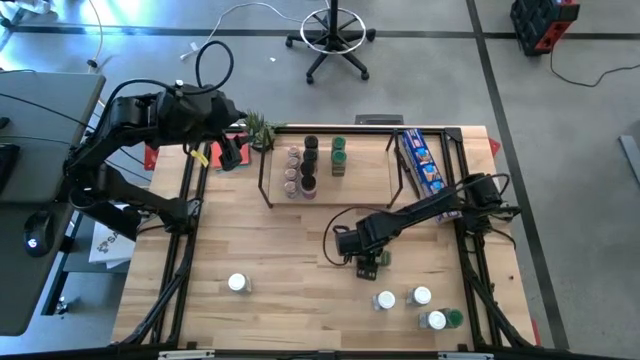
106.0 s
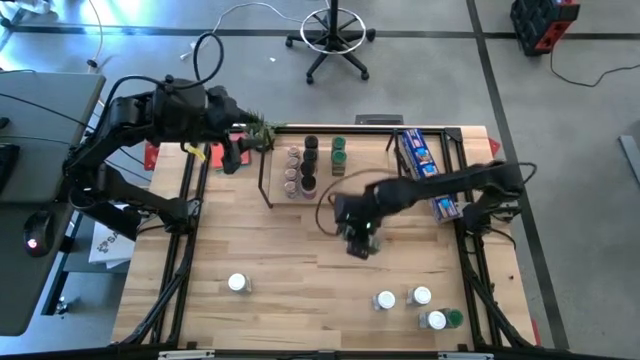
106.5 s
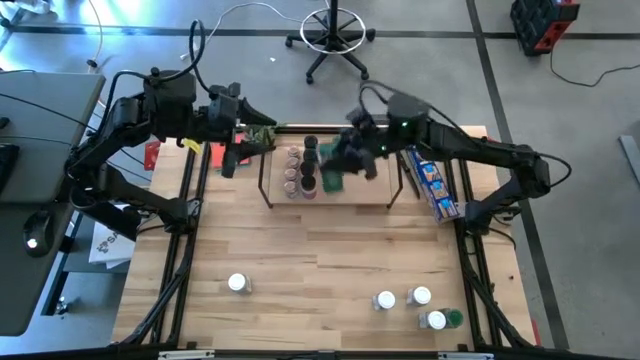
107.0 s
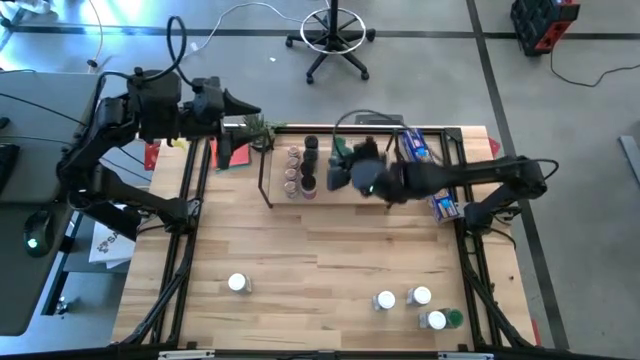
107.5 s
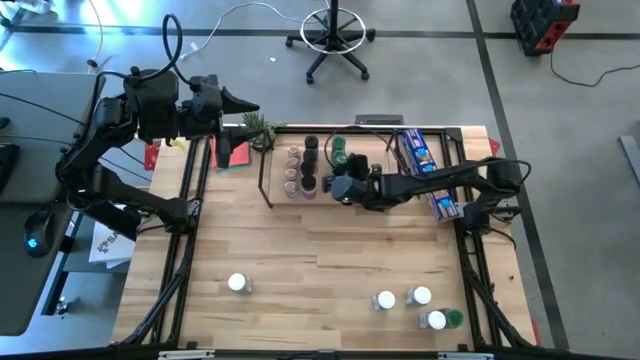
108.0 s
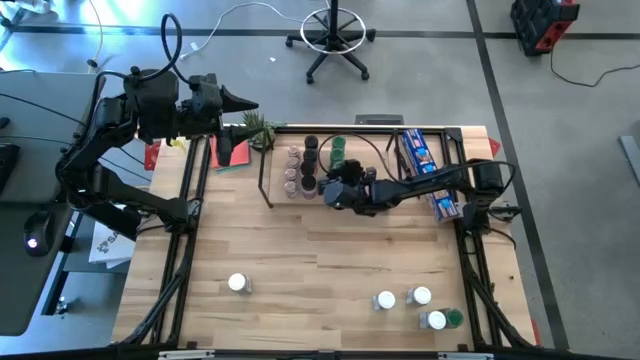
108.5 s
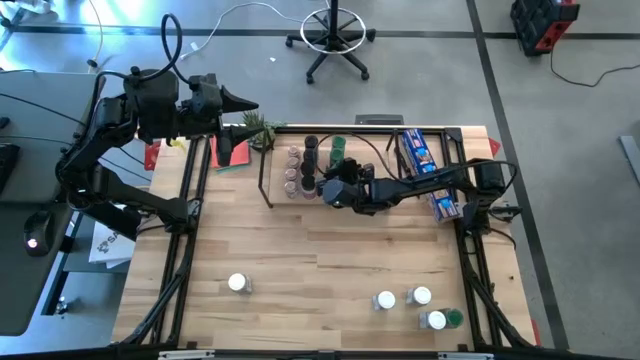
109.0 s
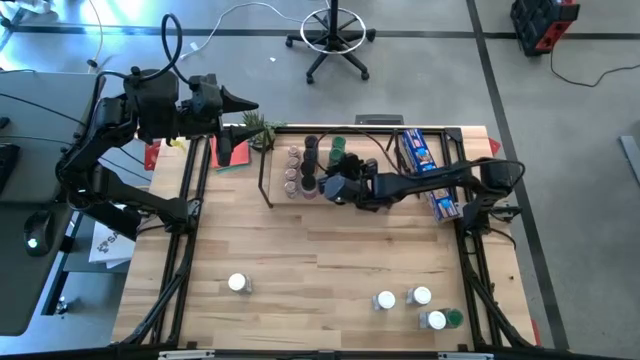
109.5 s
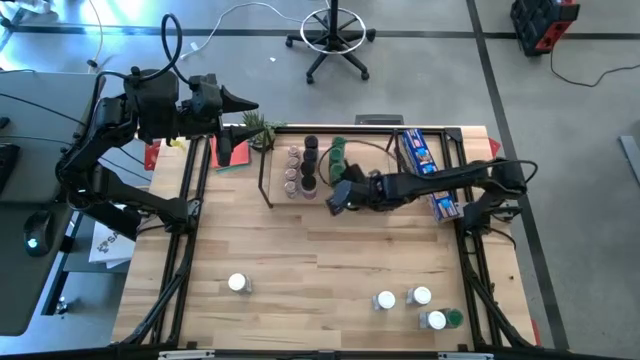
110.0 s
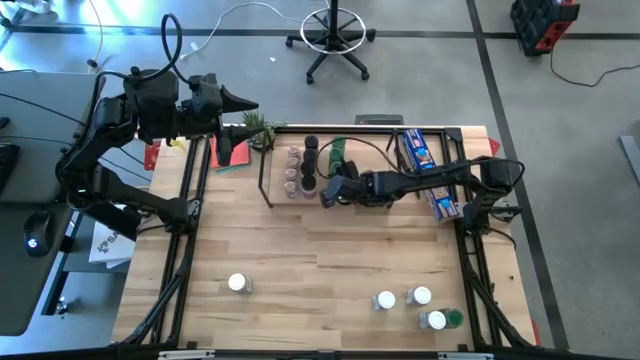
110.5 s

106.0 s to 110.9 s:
Task: Shelf spices
Put the green seasoning bottle aligned with the other green seasoning bottles on the shelf

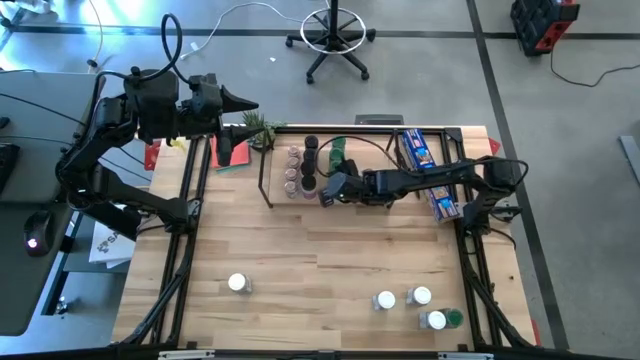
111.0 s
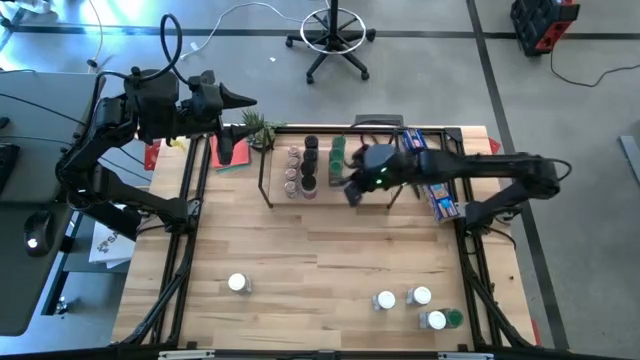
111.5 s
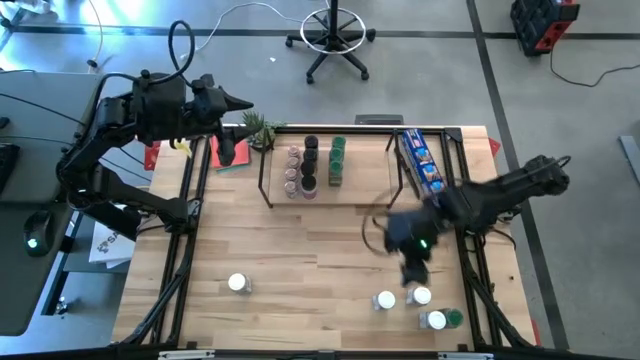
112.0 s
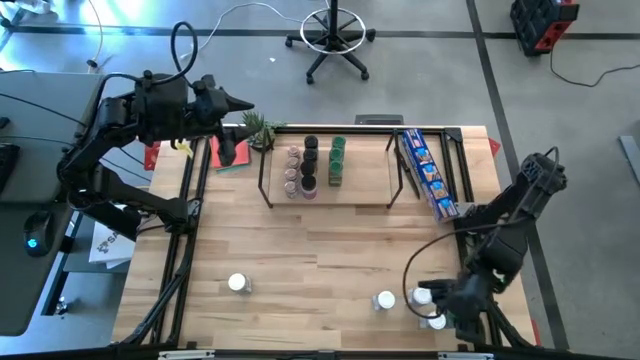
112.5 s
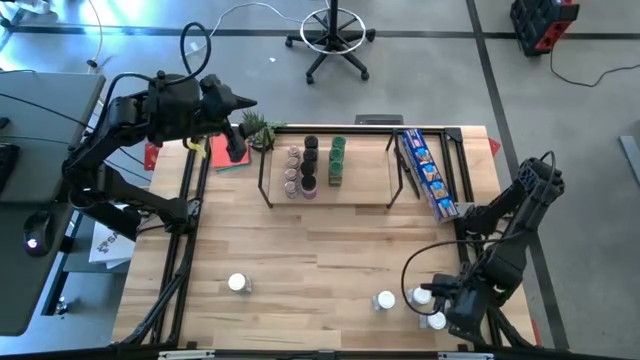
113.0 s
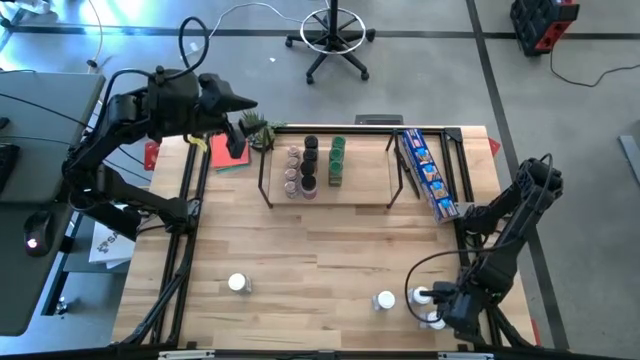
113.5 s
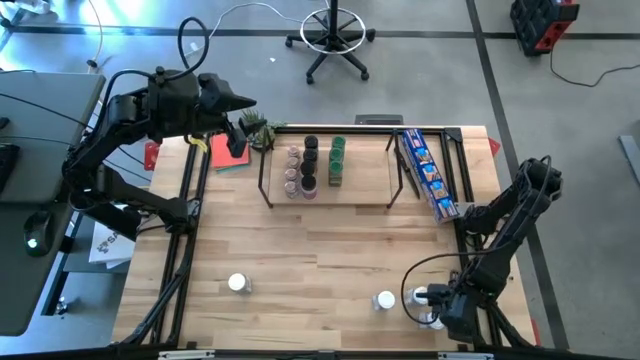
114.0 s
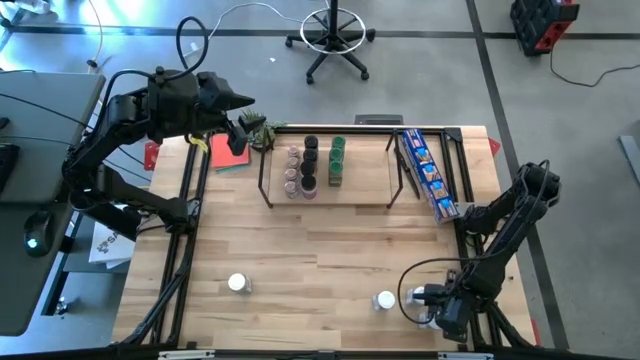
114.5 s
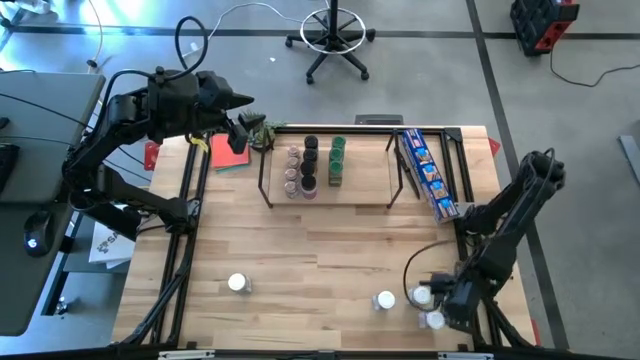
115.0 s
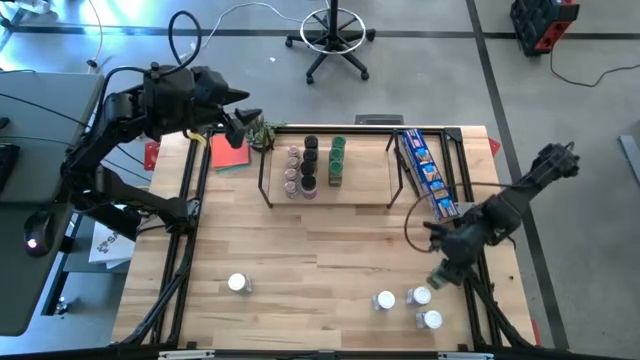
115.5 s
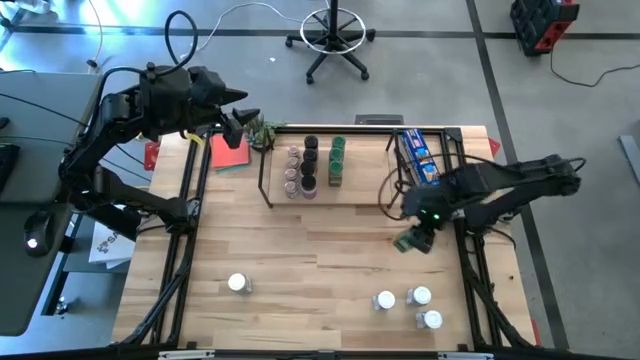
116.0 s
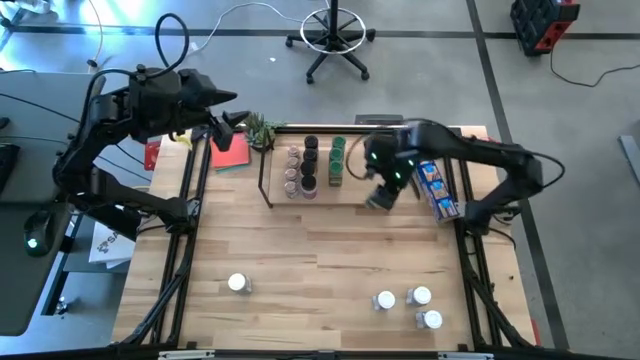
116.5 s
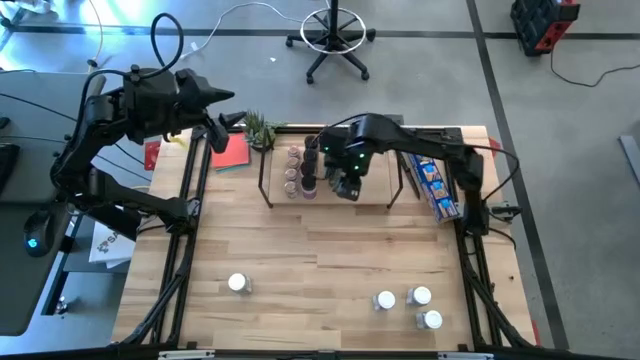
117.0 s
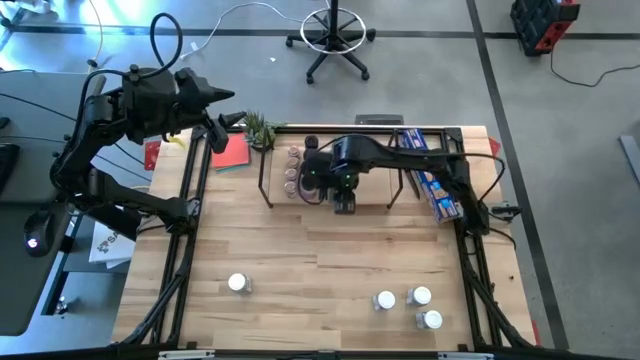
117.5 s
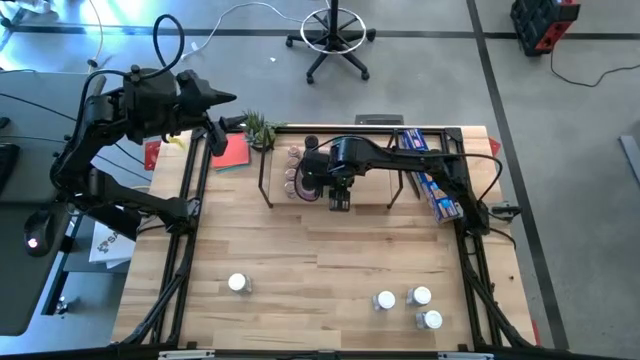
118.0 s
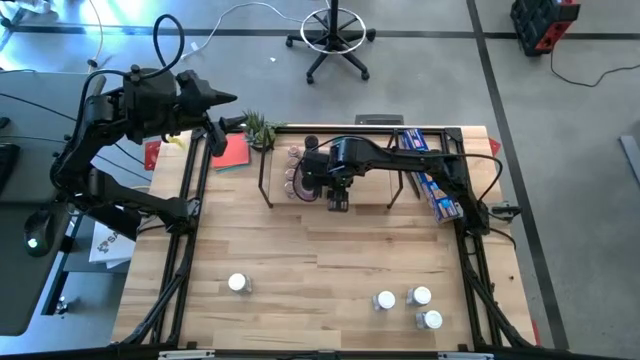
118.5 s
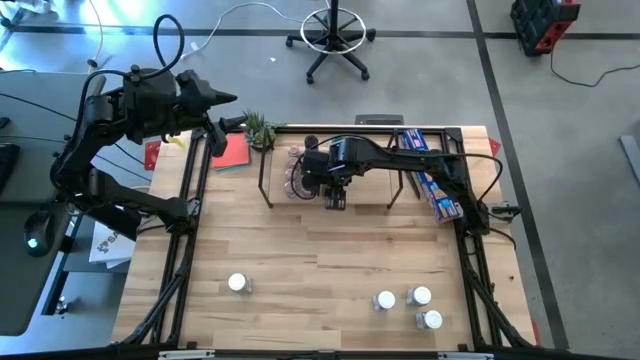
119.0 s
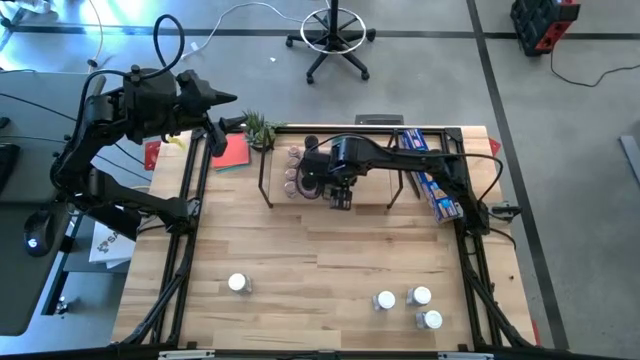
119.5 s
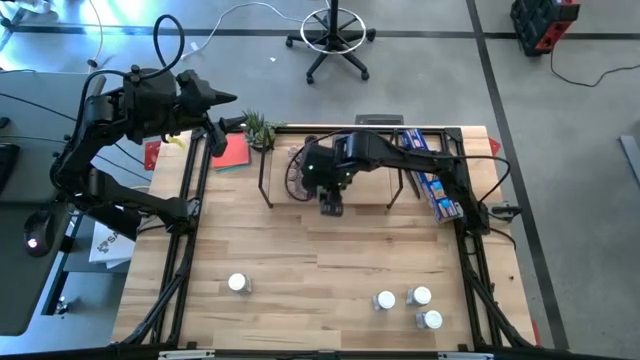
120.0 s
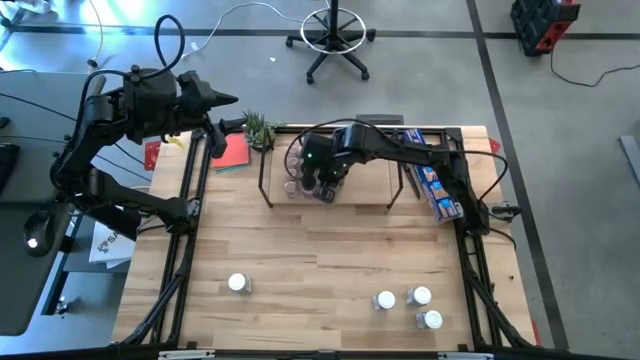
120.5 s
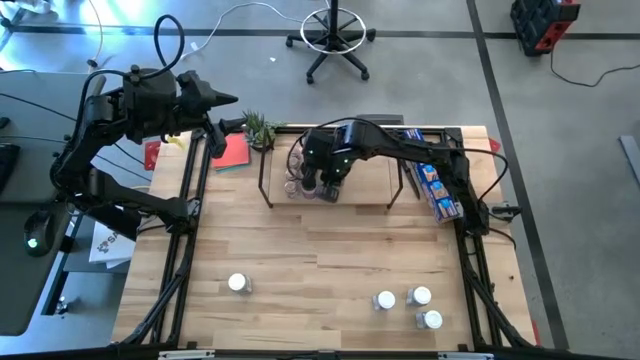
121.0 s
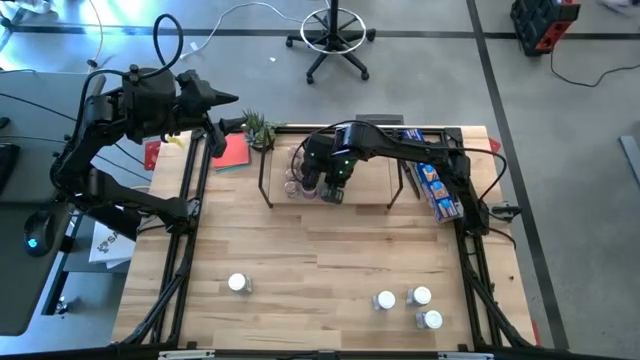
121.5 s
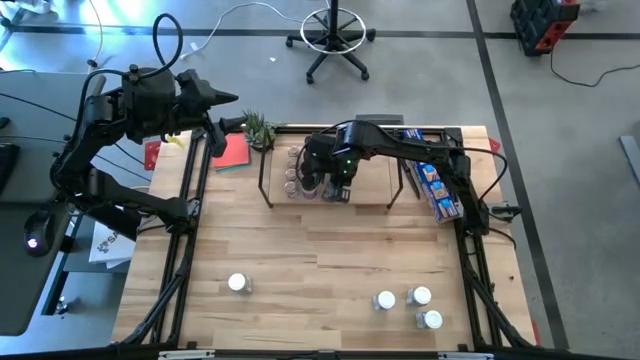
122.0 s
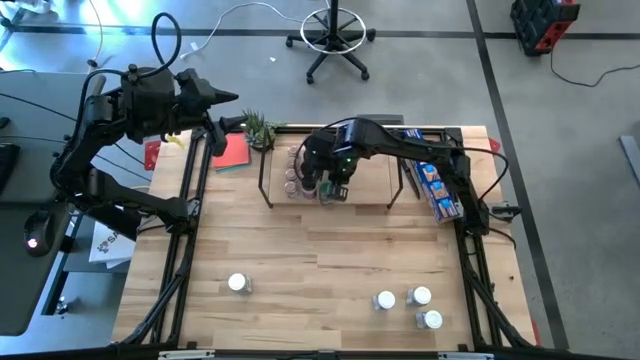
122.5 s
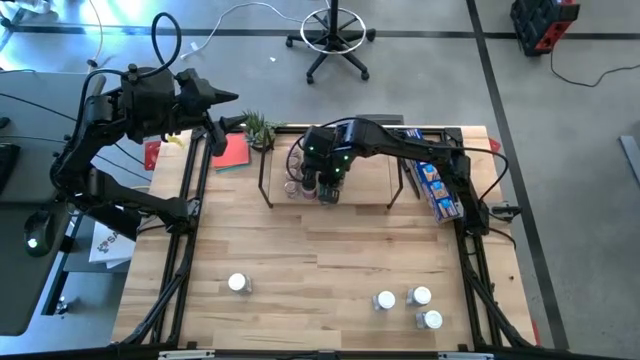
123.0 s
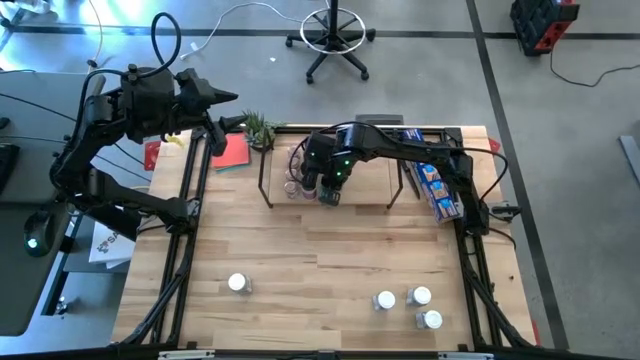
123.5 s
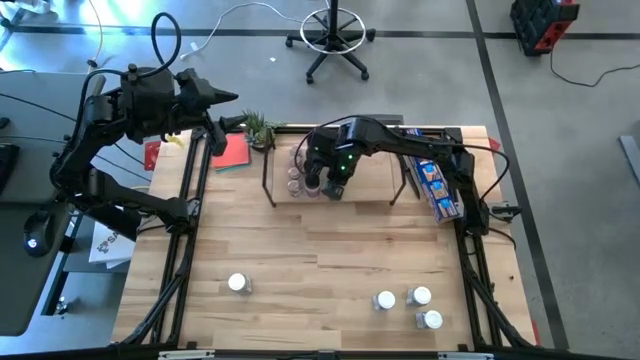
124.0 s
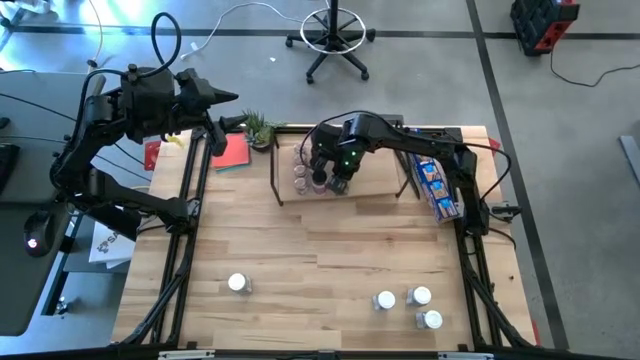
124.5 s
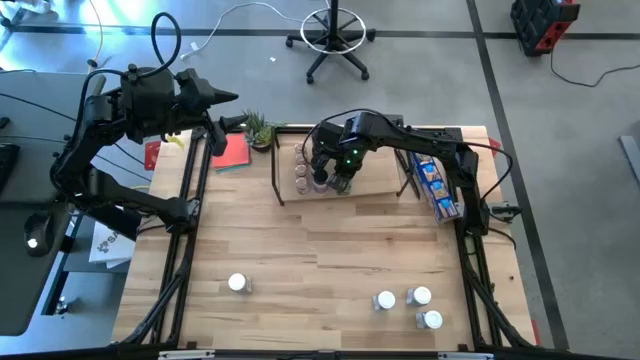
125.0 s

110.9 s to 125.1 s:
Put the green seasoning bottle aligned with the other green seasoning bottles on the shelf

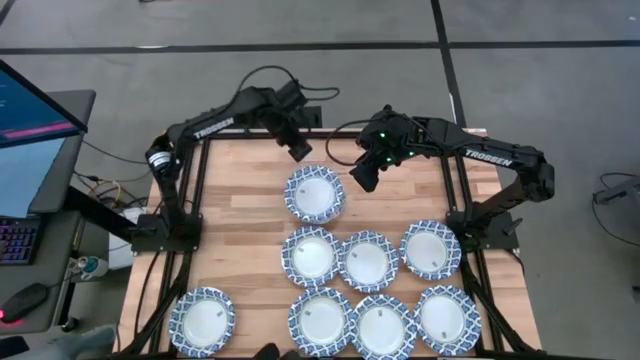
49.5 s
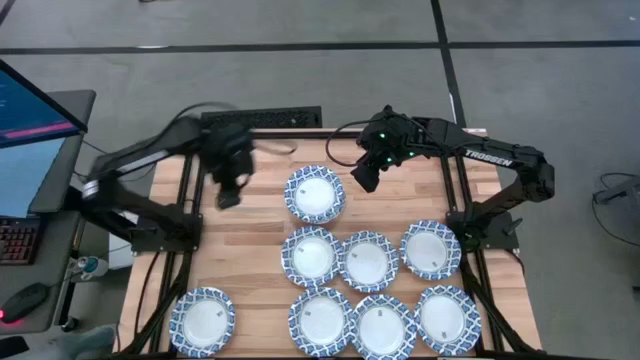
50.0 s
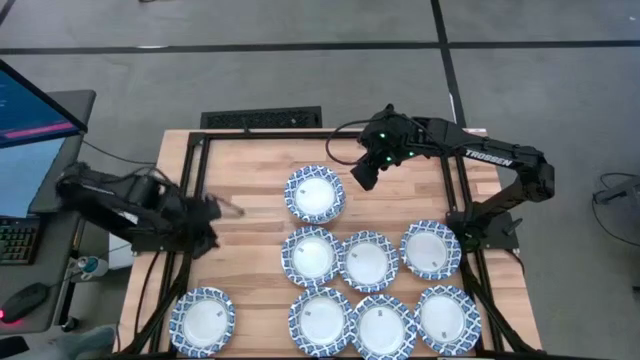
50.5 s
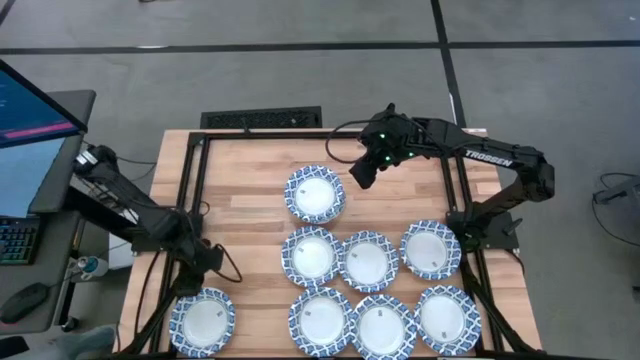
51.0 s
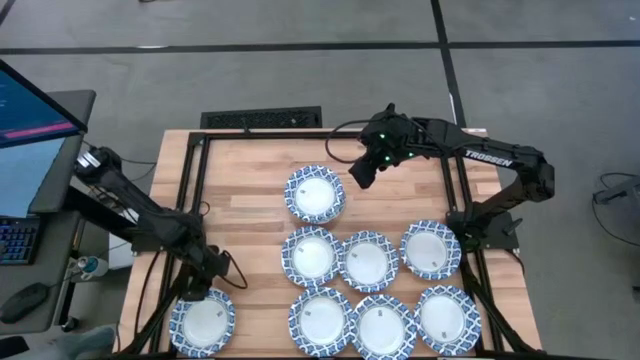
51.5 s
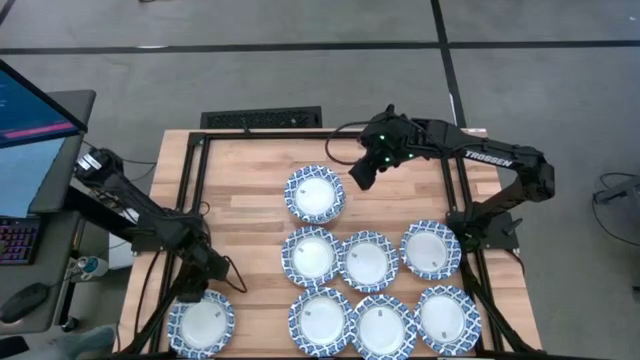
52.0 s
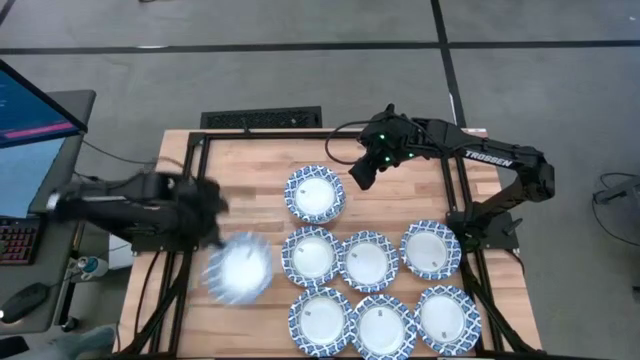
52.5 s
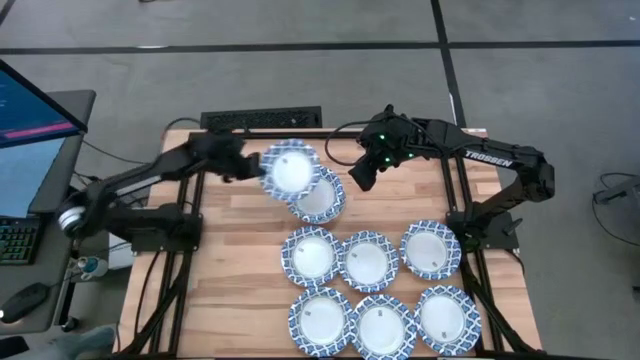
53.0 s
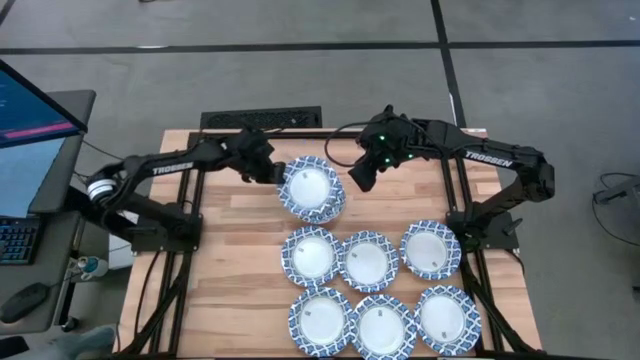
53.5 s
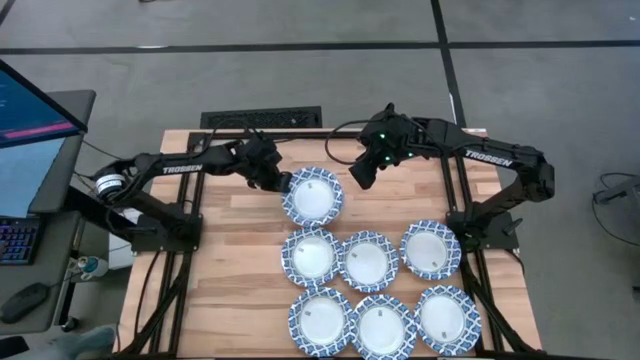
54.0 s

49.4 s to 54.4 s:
Task: Nest bowls inside each other
Stack the white bowl on the stacked white bowls
